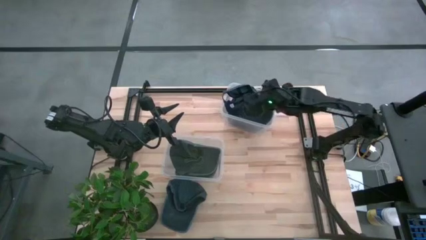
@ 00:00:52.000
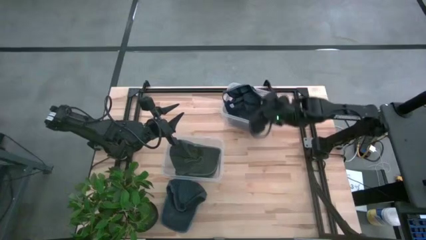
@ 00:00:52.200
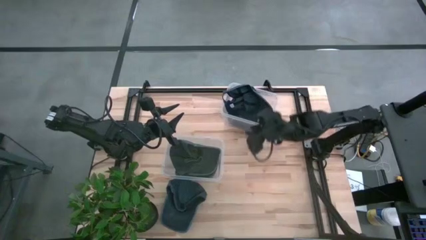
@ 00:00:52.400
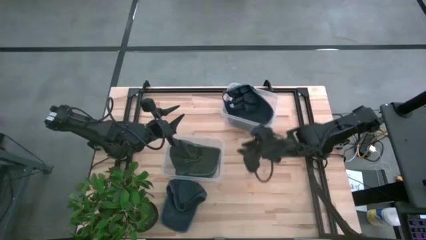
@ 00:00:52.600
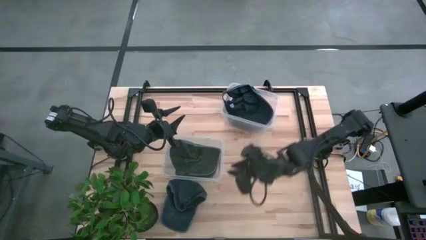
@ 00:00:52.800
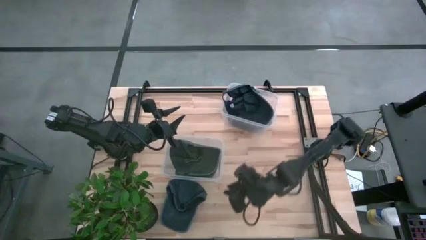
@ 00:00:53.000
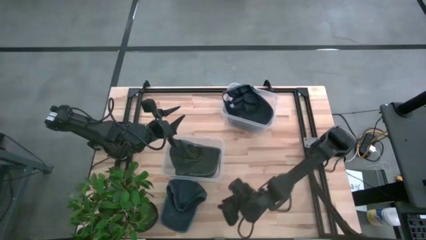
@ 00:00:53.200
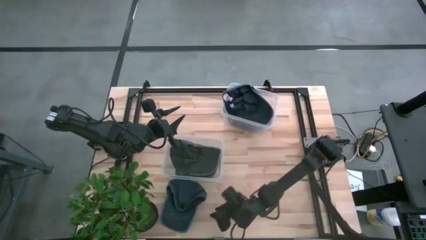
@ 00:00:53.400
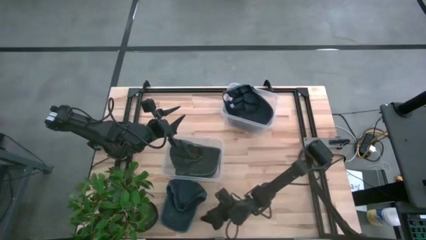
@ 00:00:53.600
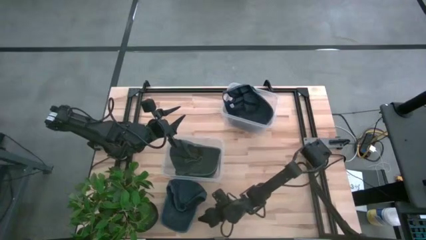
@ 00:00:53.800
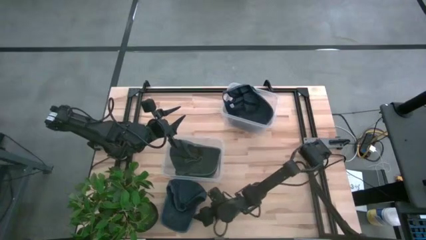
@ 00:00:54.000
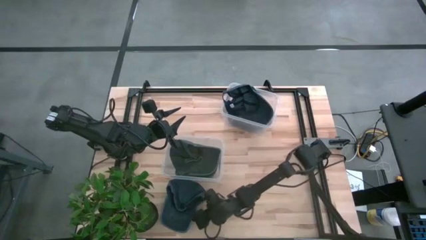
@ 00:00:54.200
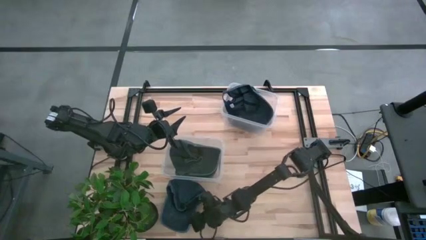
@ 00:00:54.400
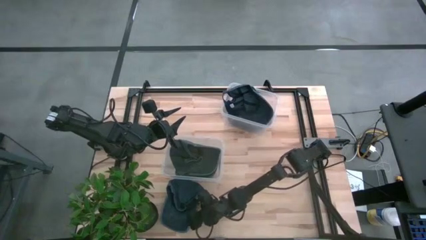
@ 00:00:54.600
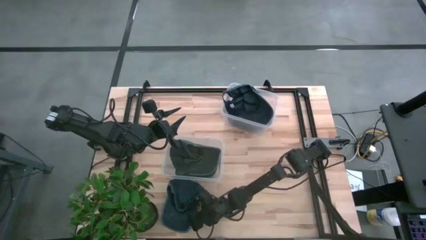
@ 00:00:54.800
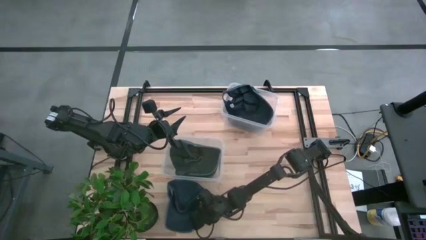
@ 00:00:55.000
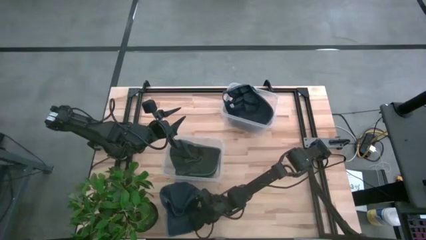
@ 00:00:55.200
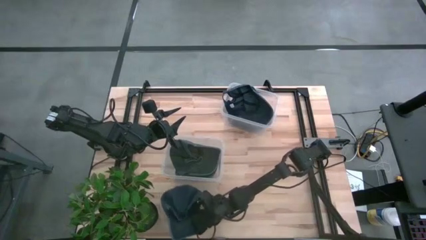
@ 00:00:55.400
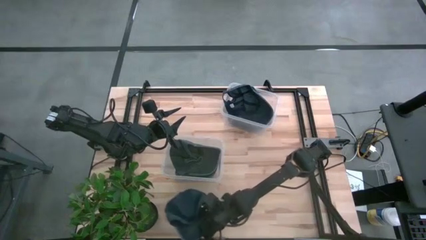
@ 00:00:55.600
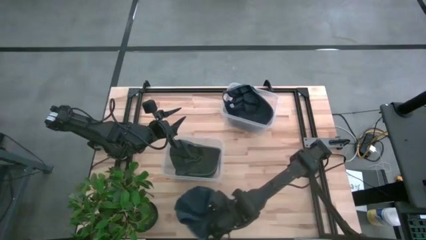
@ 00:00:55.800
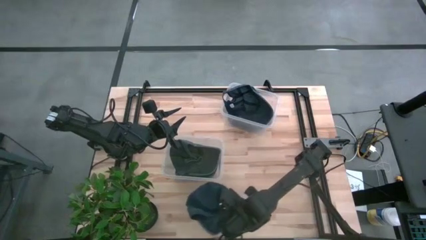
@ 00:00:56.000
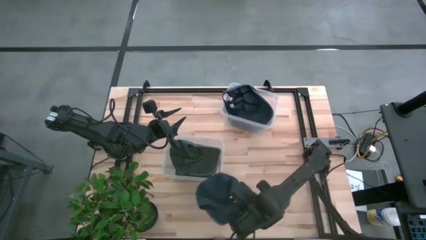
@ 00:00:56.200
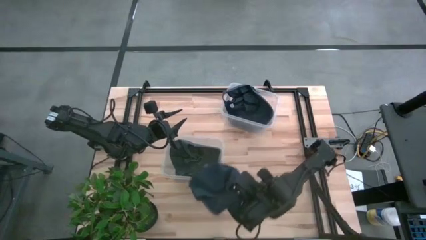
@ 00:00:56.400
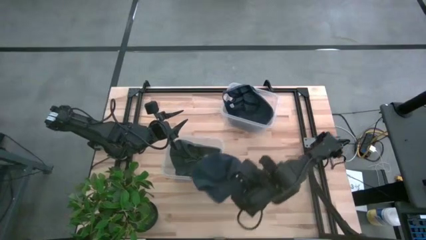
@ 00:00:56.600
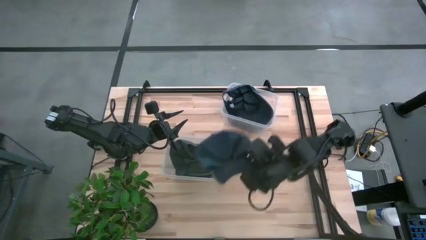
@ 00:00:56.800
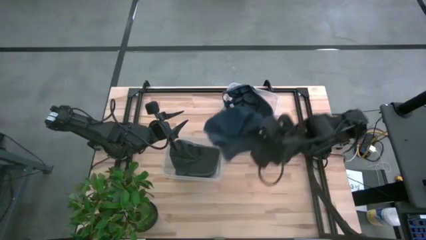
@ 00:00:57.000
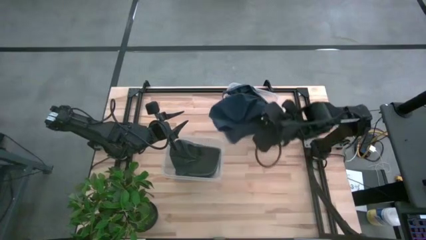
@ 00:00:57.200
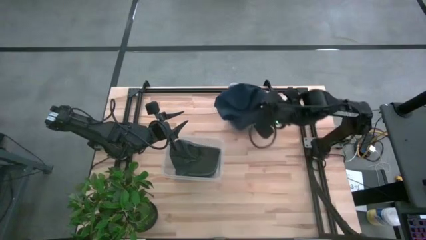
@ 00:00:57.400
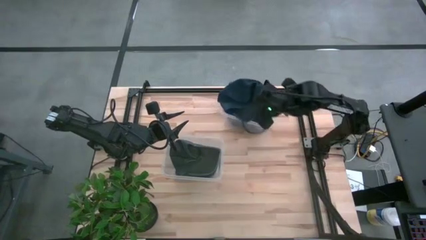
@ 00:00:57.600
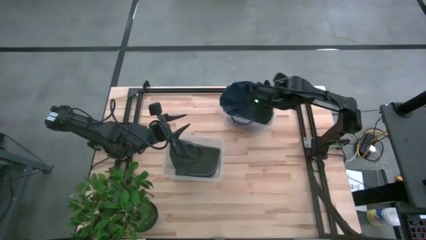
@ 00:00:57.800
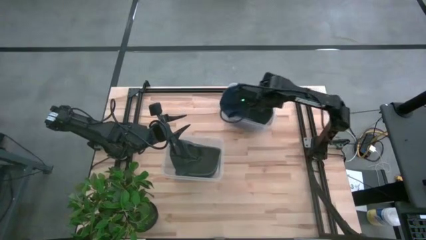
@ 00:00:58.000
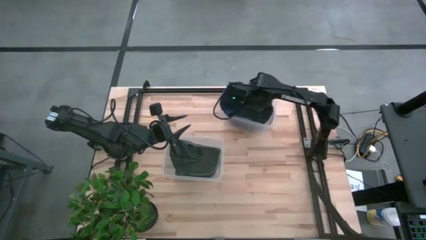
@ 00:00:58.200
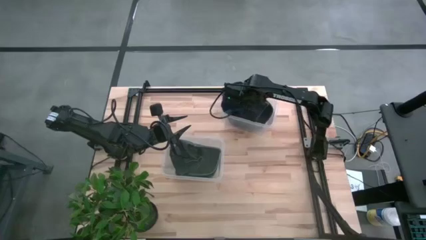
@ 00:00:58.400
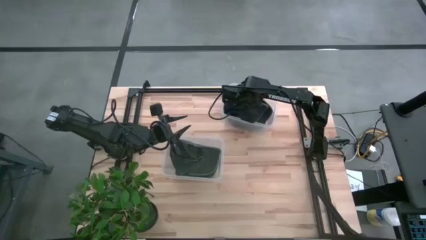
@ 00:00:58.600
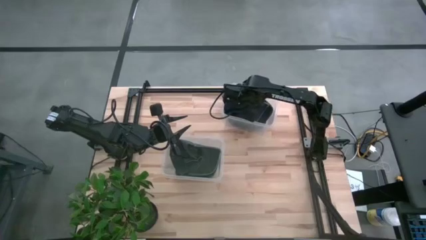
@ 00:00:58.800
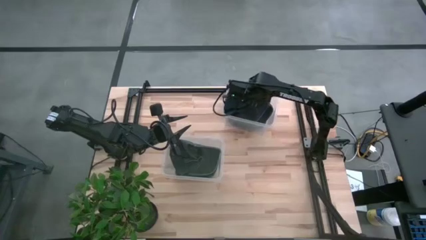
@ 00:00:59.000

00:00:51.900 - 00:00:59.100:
Task: Pick & Place hat
Put the blue cap into the top transparent bin

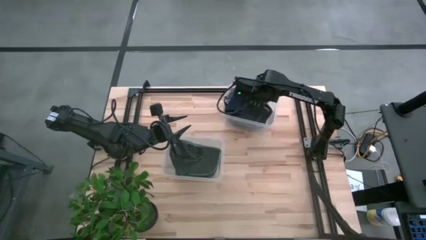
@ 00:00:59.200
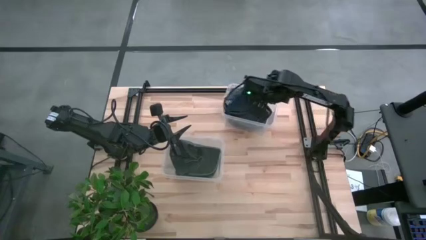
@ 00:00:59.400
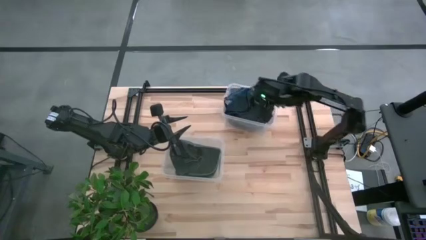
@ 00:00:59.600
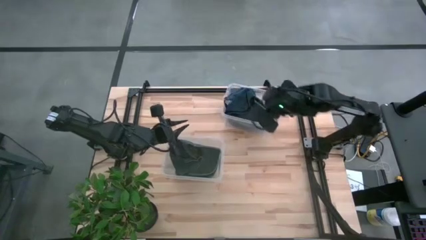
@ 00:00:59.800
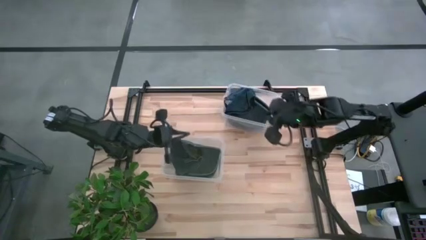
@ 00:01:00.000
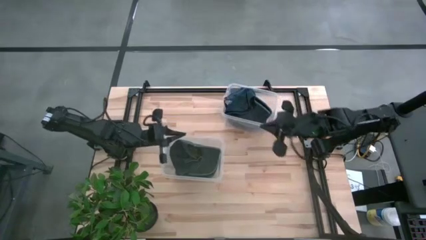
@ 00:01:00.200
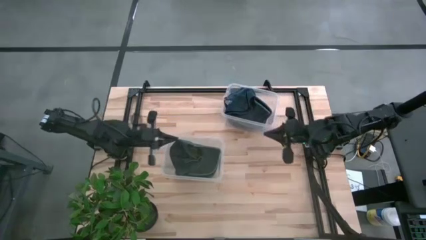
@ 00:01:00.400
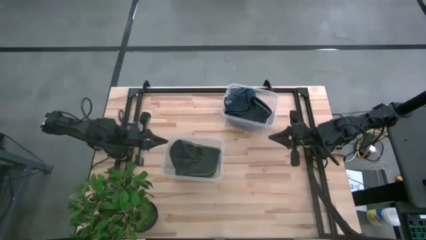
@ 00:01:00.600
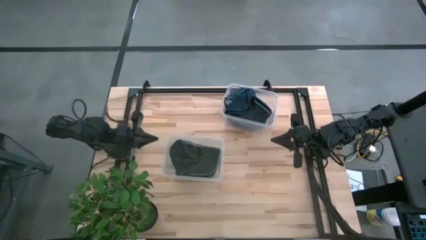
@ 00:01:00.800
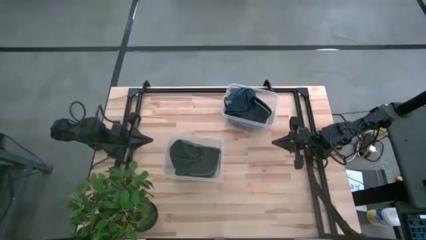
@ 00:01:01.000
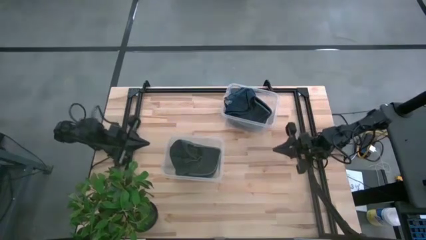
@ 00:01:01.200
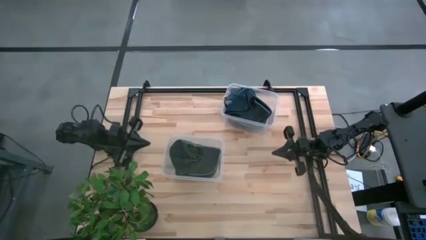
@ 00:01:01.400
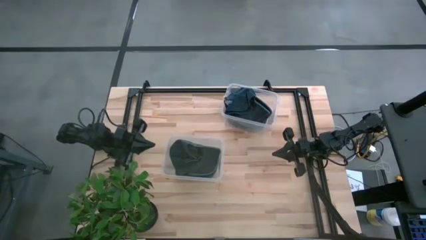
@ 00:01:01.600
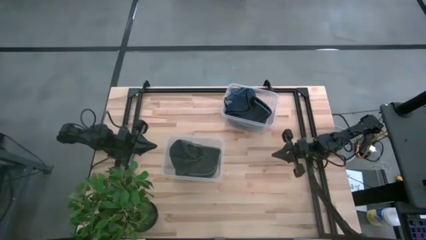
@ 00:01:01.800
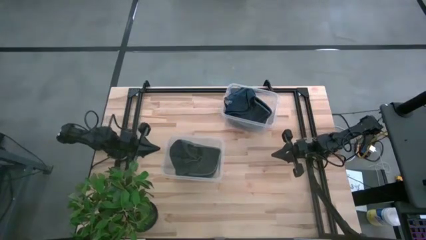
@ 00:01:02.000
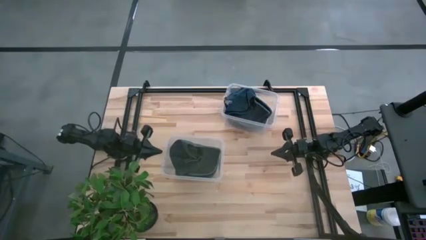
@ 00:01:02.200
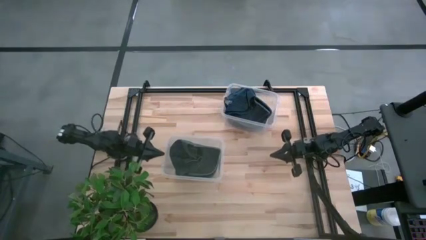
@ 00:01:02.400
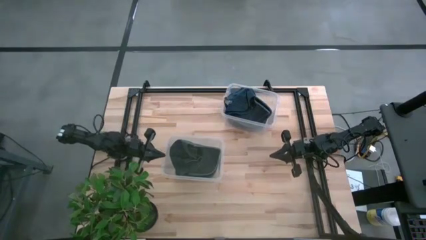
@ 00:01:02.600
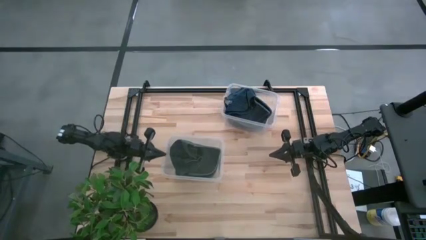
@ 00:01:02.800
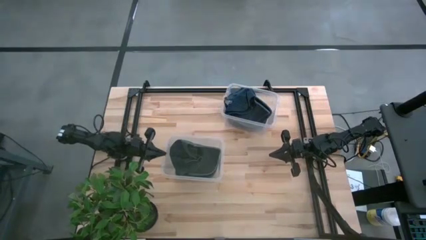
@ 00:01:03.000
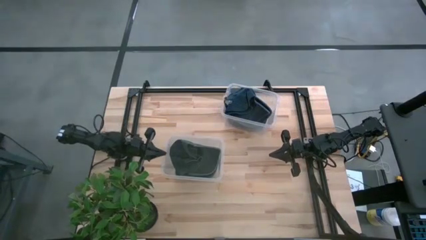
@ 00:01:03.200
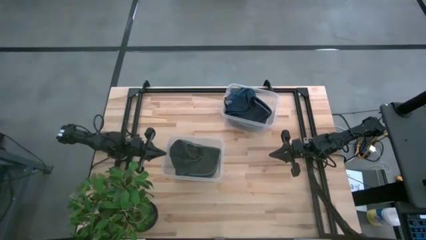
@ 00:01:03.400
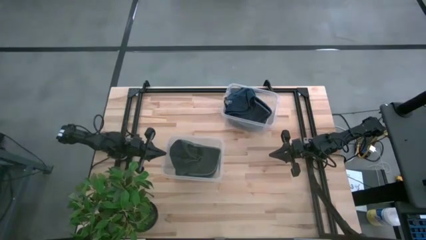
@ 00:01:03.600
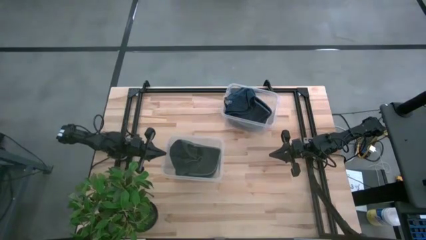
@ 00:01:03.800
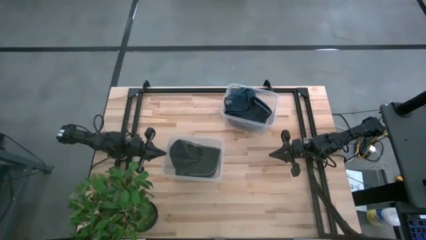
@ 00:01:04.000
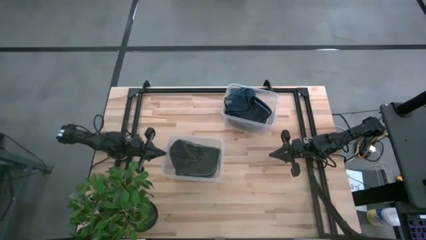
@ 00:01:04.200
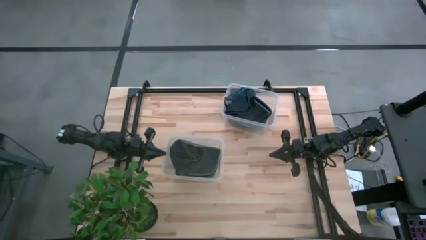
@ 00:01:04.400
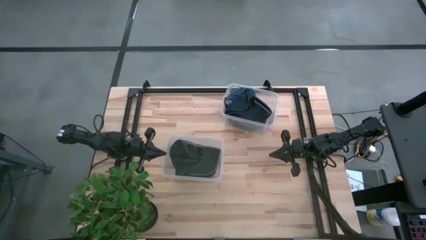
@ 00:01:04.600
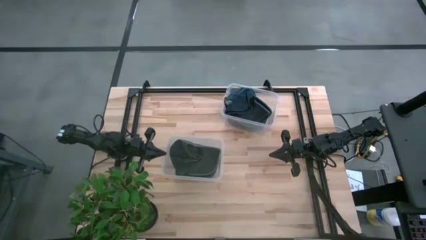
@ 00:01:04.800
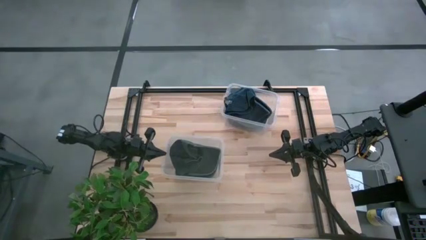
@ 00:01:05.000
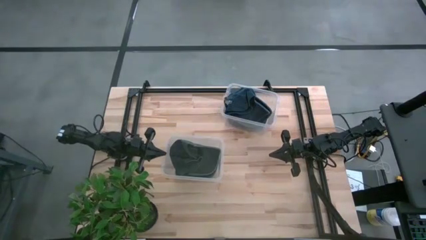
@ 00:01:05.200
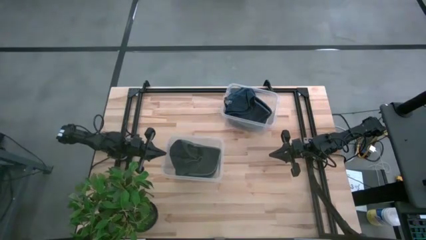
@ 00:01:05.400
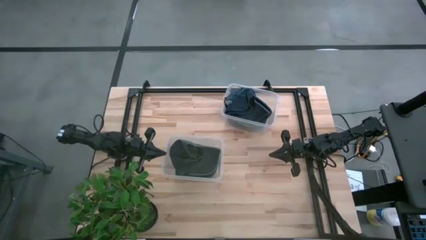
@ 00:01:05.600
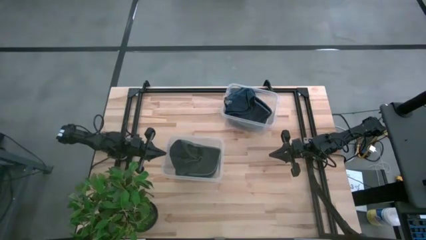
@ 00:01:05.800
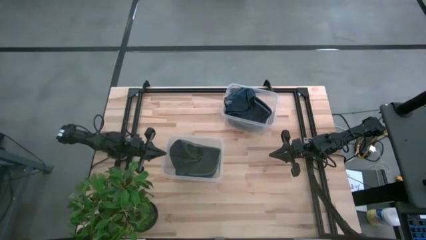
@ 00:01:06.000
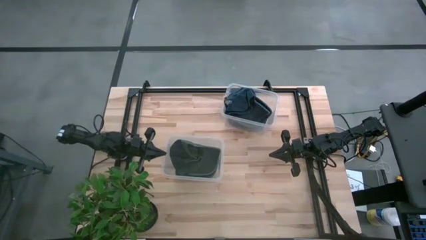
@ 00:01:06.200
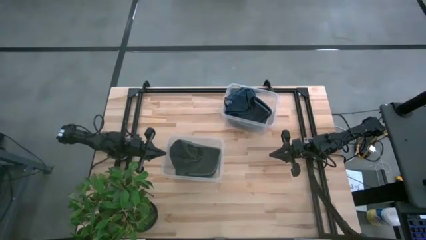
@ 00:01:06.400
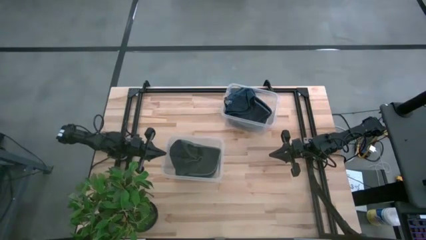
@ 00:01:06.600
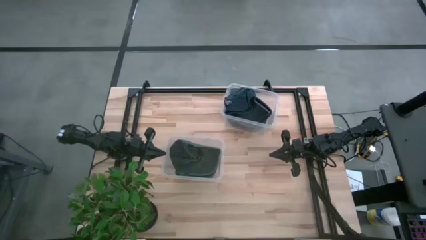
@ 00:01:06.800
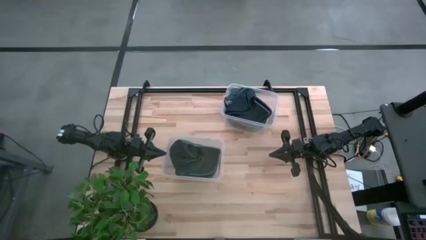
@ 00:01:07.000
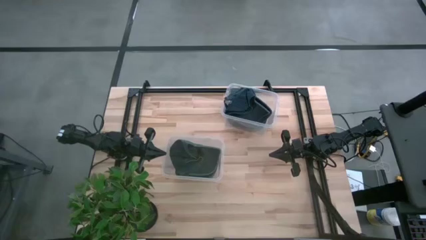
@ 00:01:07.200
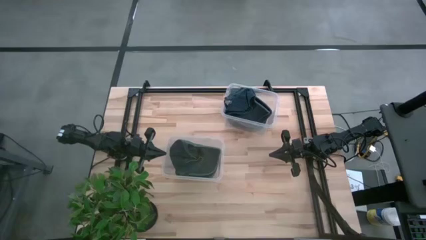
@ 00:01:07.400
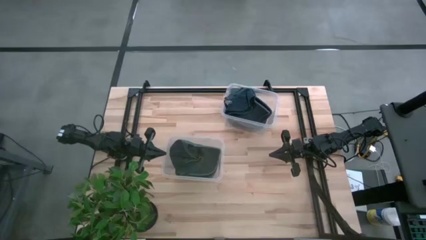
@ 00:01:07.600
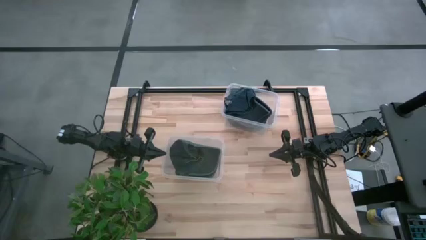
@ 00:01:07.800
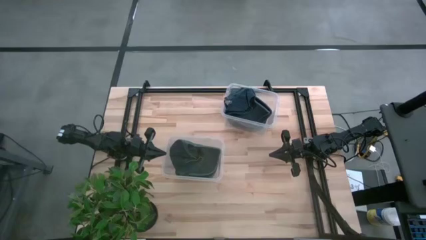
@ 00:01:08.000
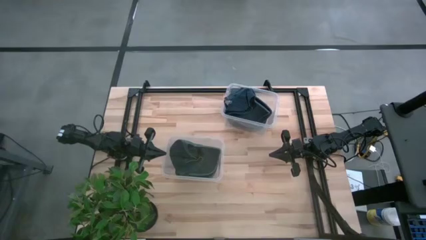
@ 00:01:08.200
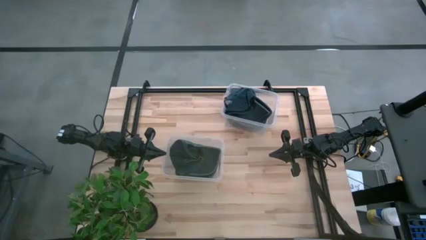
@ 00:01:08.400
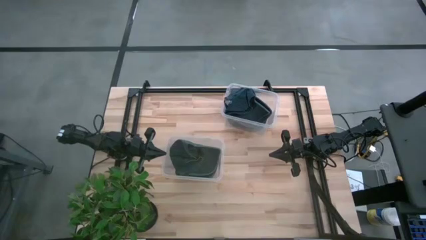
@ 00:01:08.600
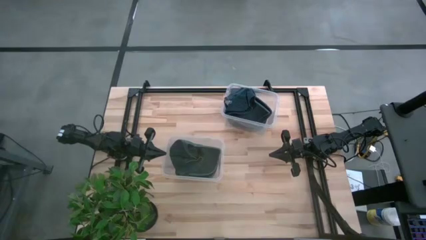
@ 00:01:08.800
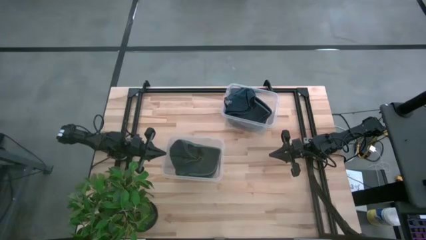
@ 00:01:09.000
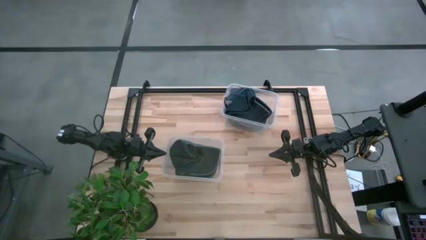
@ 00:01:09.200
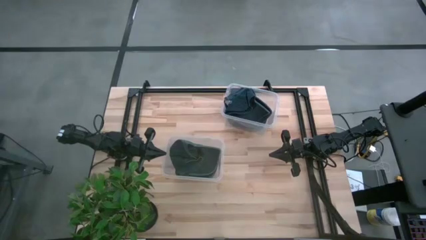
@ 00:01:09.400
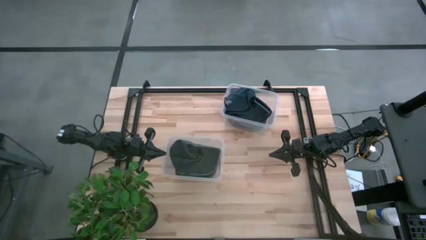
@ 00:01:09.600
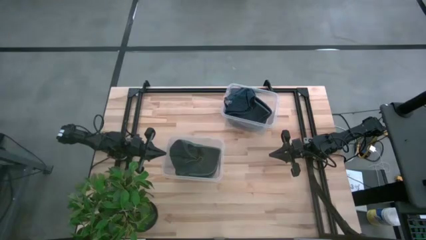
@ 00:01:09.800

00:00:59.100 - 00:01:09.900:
Return to Home Position
